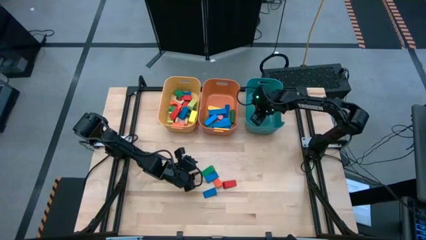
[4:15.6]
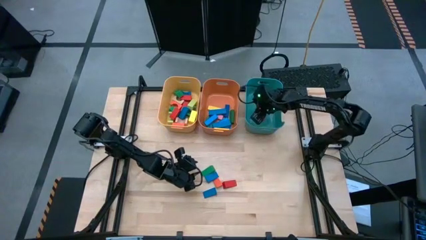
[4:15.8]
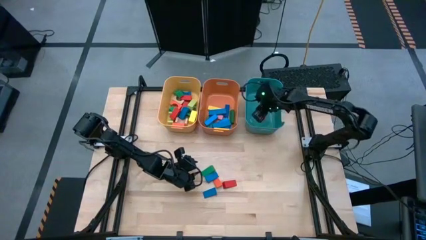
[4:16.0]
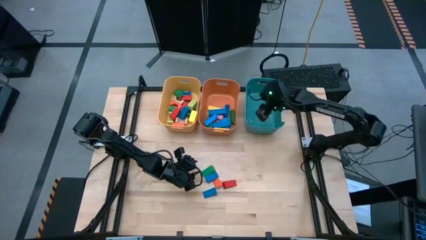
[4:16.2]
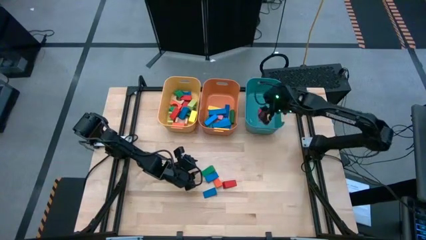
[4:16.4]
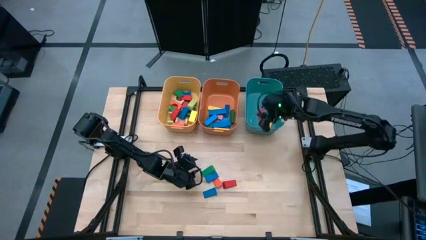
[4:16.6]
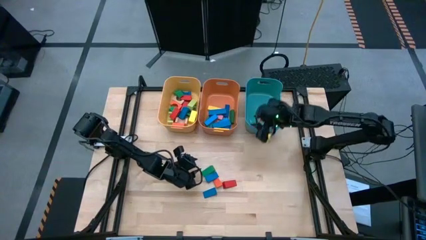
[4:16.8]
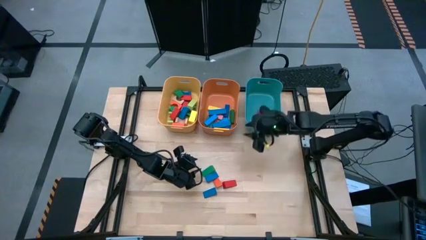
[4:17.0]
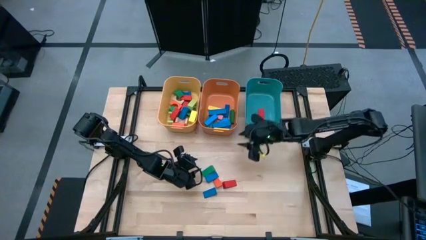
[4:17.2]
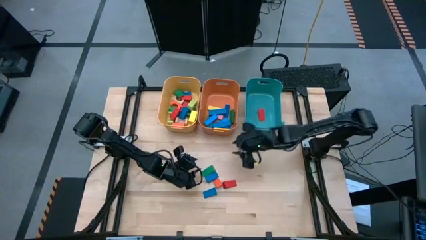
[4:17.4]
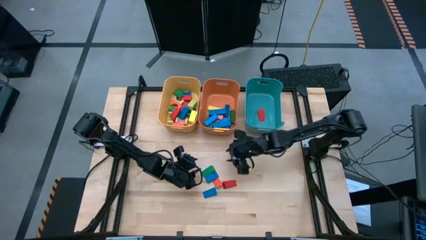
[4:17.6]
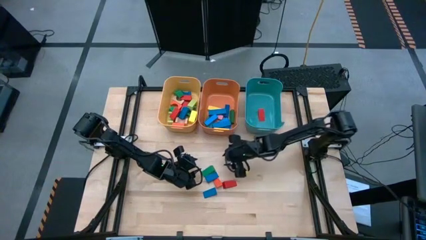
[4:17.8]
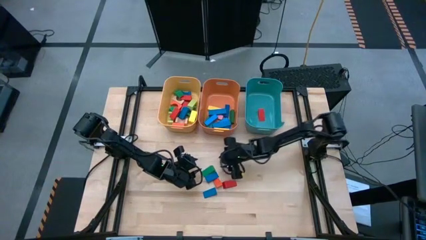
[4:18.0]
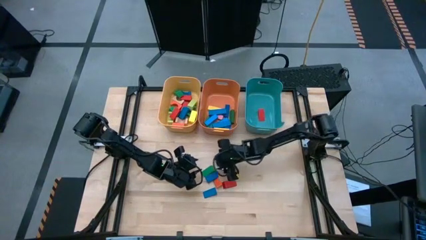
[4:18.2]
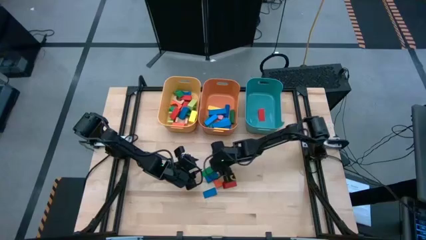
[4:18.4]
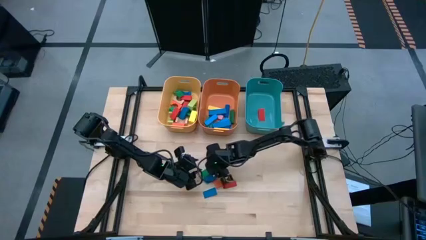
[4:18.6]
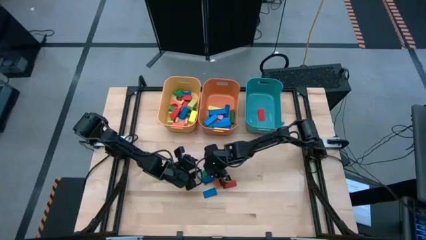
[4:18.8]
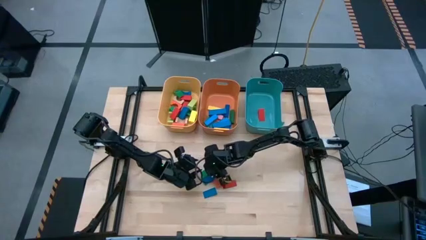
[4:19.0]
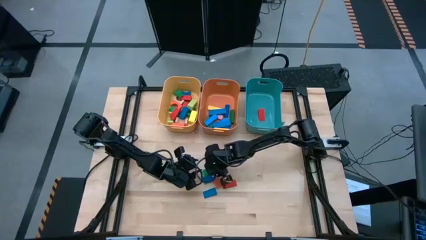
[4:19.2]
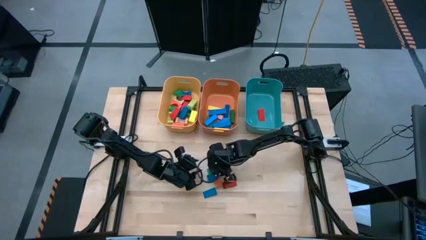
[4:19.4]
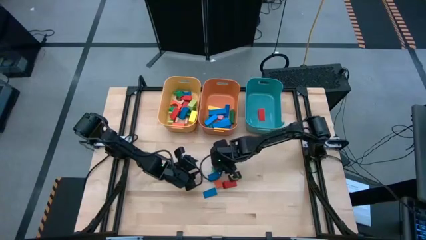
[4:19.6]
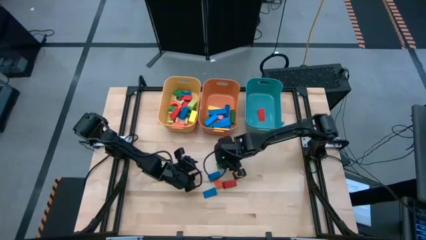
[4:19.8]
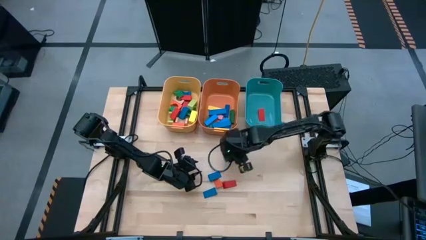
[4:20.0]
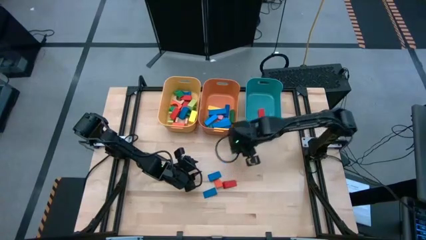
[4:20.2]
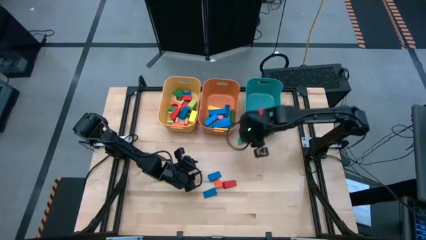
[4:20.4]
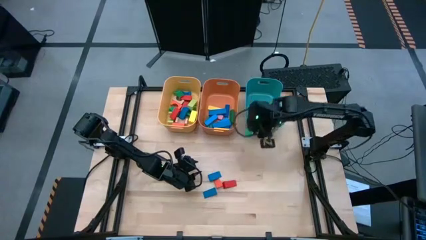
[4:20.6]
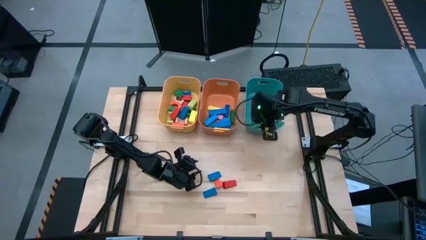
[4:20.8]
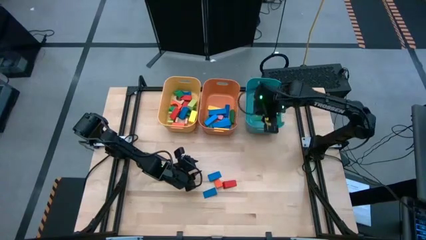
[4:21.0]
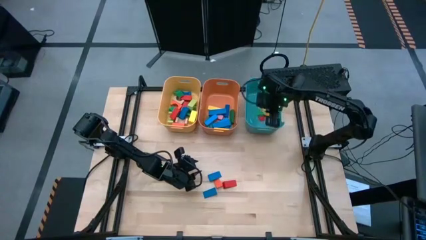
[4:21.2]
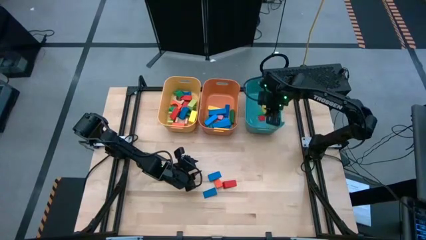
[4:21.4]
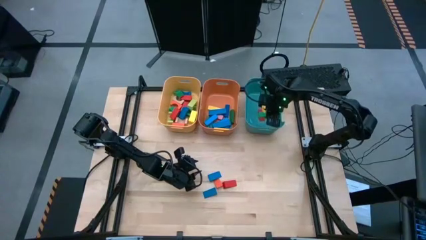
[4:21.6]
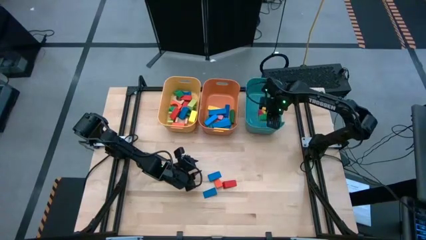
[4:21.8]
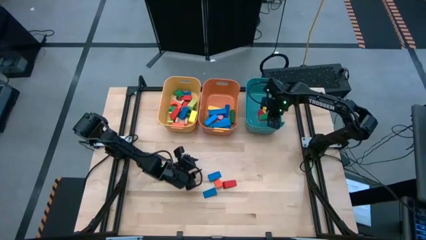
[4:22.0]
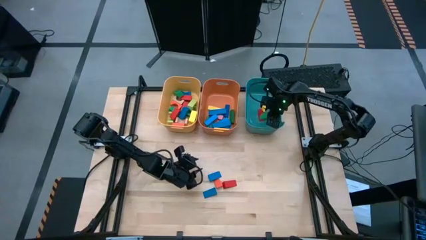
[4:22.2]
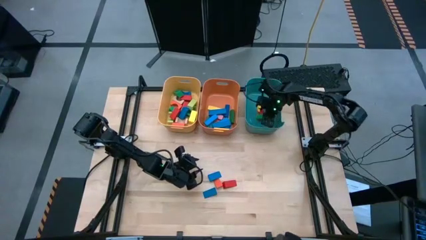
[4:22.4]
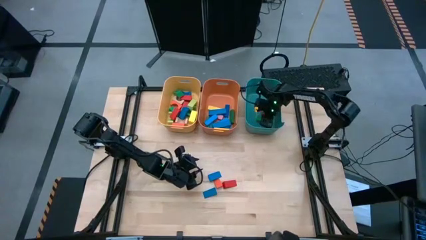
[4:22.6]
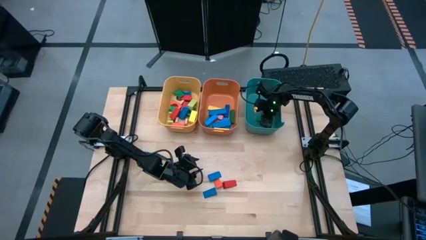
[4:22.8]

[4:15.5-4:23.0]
Task: Sort blocks by size
Put the green triangle block into the blue bin

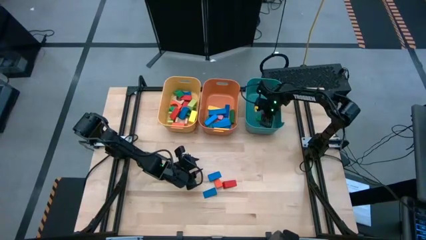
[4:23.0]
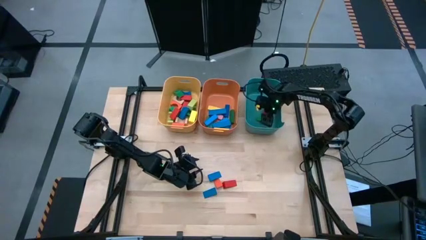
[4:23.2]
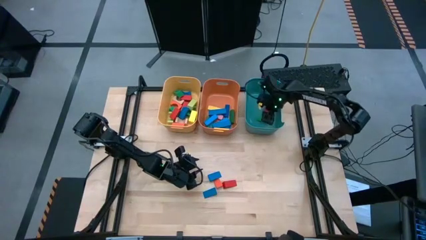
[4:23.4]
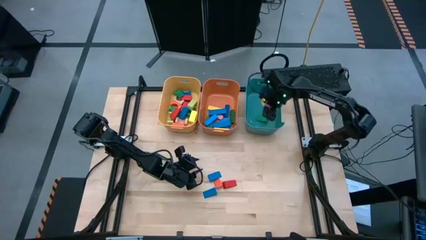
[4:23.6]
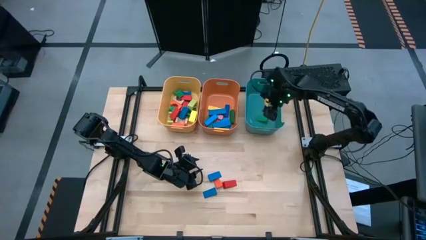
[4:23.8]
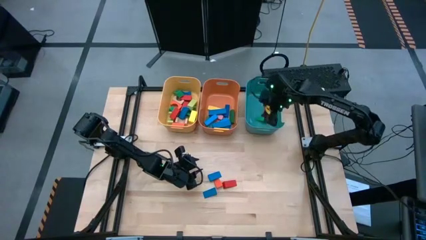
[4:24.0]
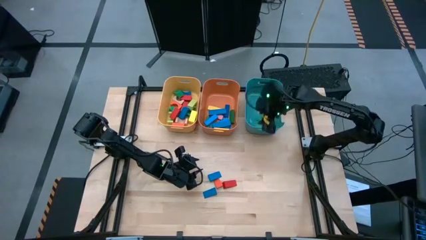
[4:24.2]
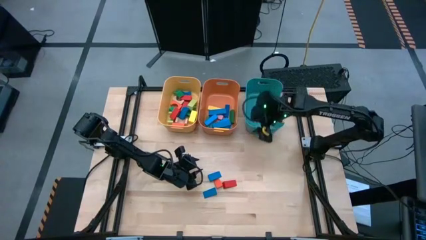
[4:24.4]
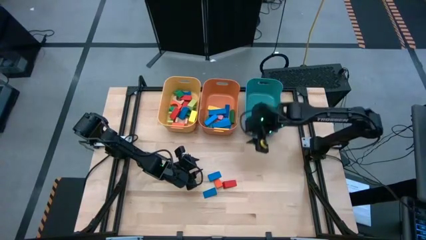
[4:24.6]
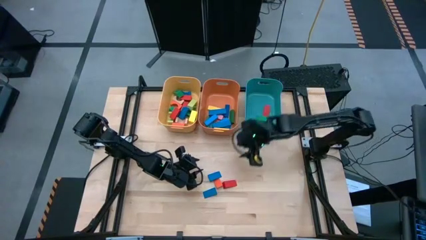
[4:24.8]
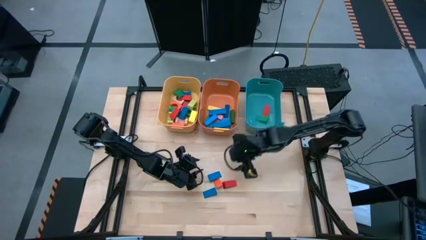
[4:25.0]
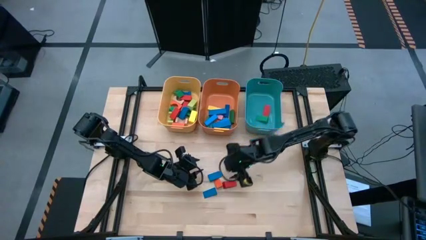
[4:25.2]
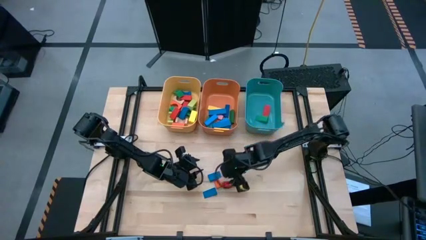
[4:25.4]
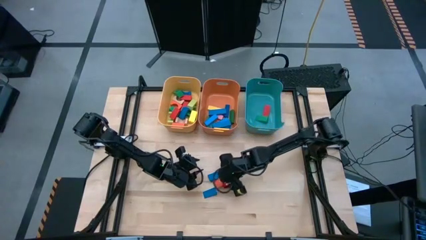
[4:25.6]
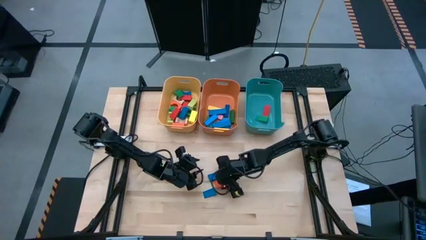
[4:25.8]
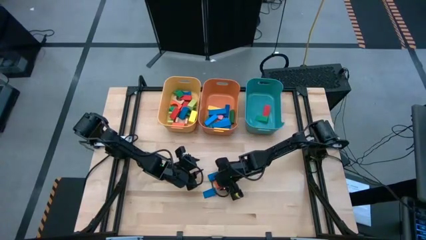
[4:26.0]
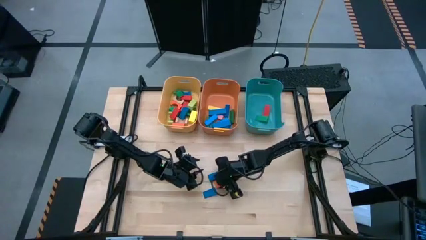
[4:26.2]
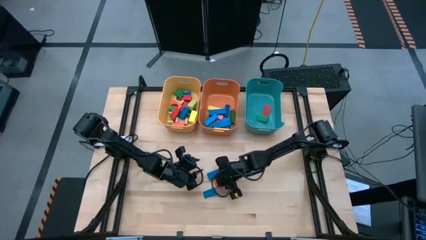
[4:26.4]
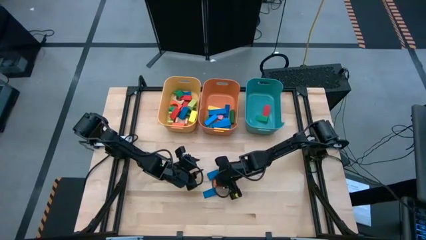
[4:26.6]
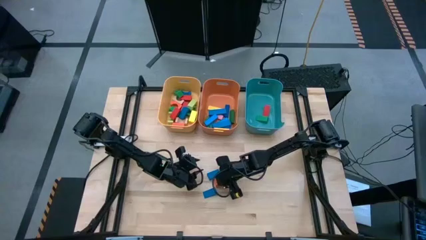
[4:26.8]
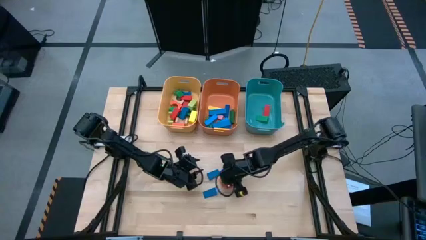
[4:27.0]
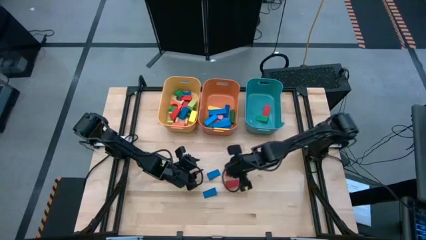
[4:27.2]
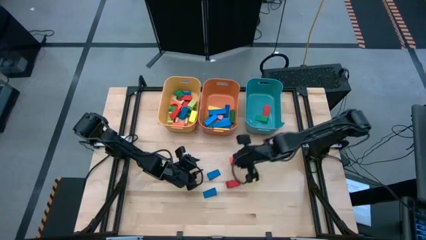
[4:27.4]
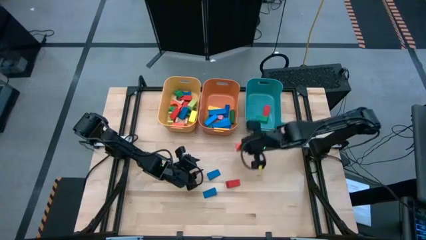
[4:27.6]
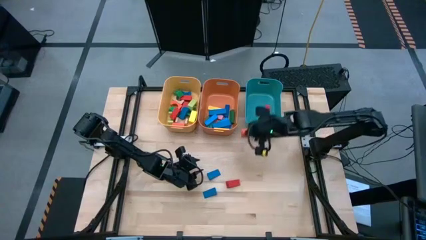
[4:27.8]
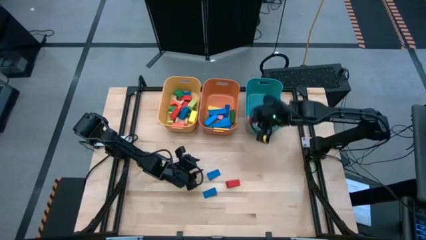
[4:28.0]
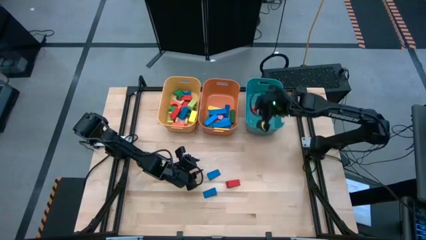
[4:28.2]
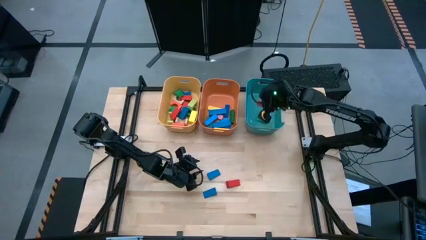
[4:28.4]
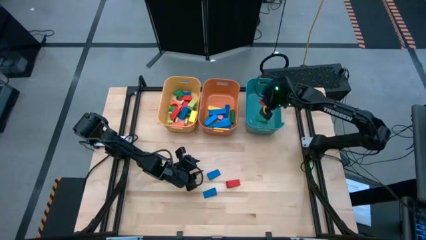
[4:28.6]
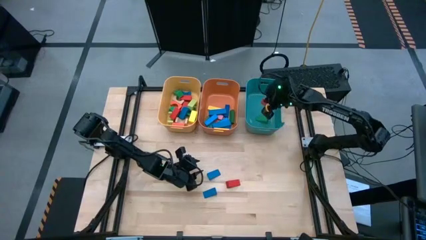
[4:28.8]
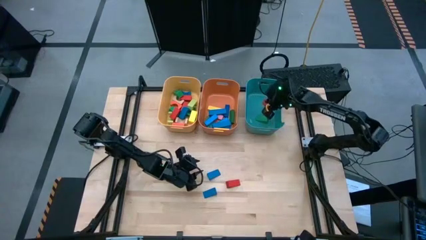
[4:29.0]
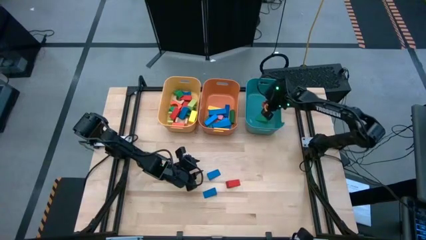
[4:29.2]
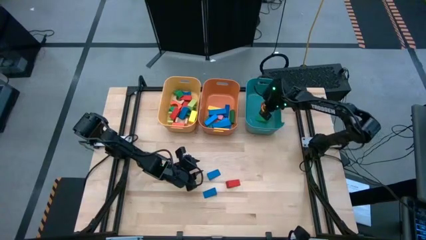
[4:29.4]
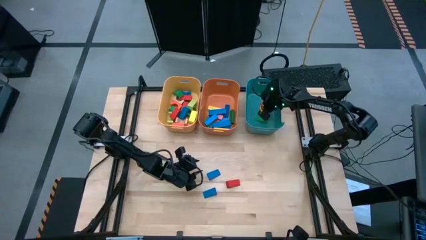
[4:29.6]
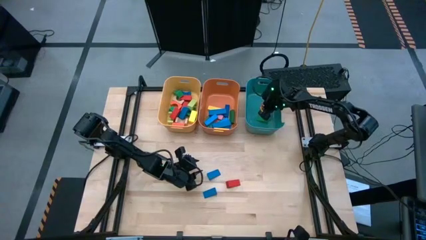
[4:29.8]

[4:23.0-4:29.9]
Put the orange triangle block into the blue bin

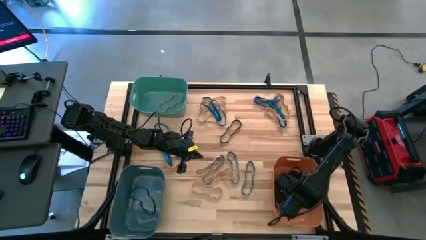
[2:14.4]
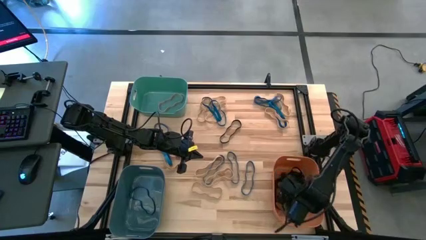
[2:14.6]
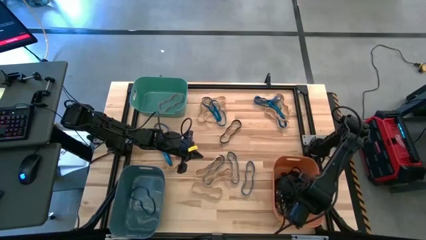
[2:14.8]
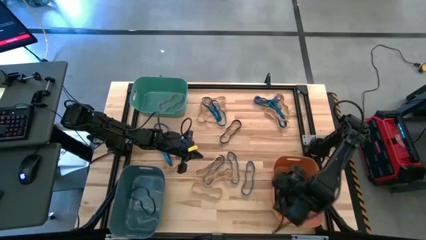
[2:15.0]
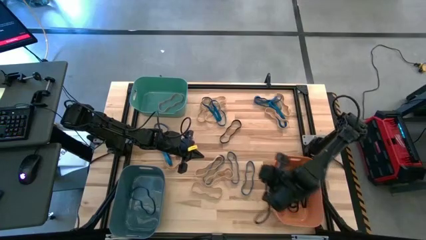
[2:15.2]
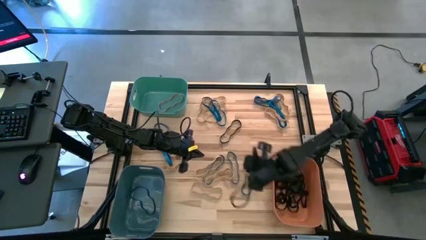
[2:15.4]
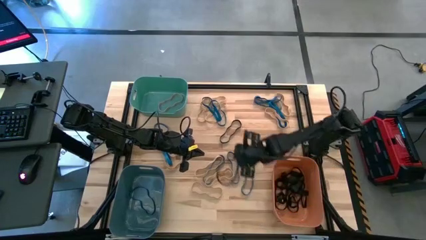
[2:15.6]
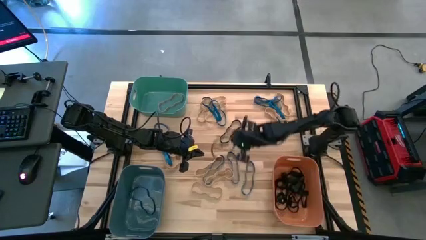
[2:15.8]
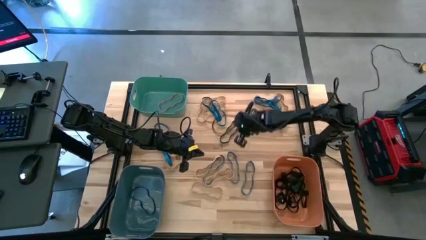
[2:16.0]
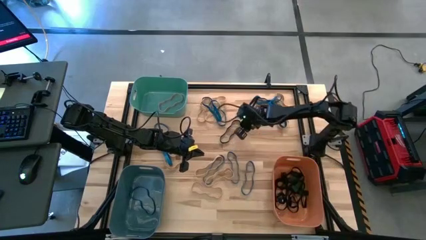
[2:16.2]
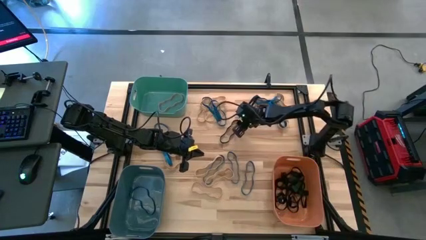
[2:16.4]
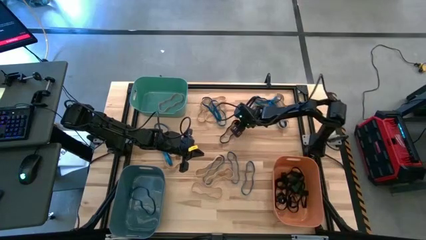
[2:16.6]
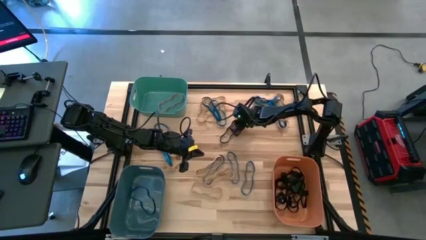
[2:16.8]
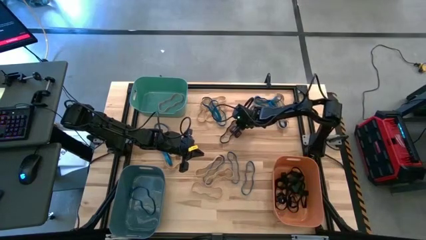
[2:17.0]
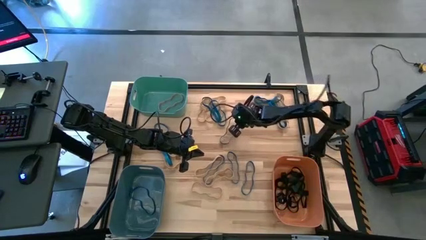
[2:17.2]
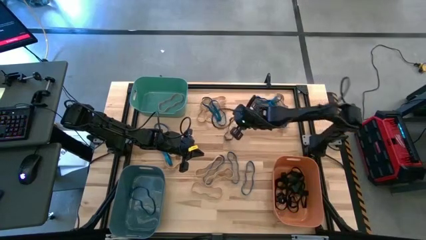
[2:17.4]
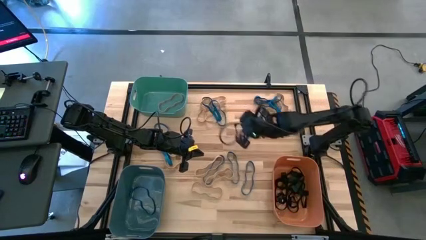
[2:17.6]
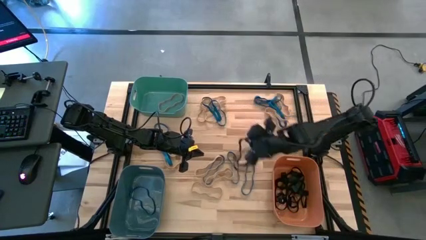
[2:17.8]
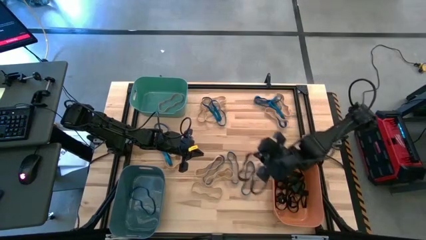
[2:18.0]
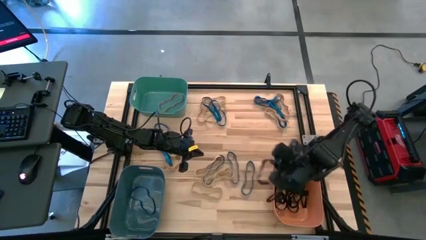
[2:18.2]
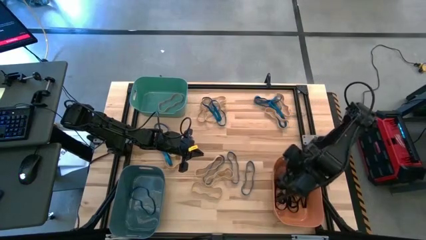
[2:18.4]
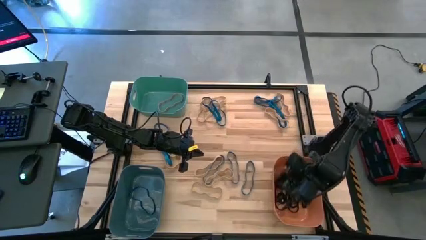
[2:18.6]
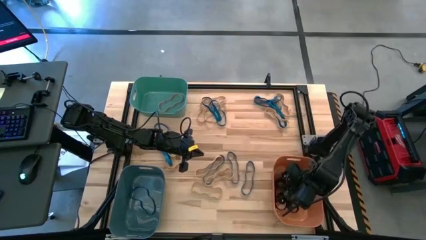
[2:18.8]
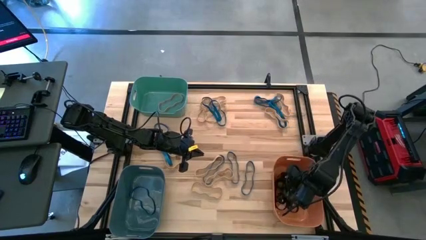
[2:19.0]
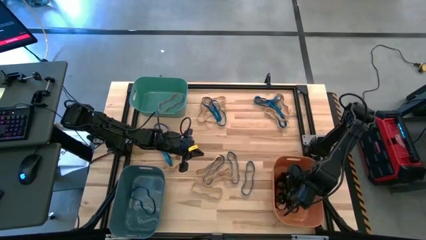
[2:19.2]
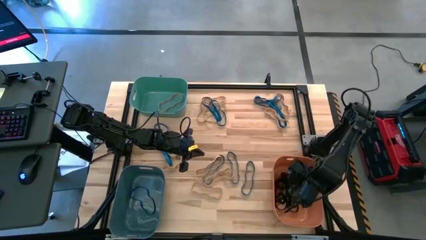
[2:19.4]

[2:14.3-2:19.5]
Task: Sort rubber bands into baskets
Put the black rubber band into the orange bin
